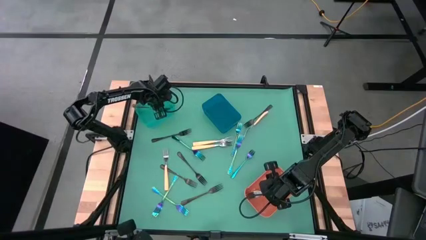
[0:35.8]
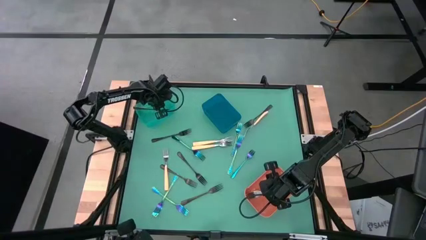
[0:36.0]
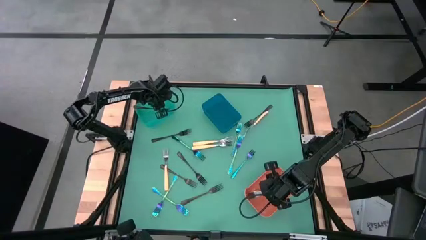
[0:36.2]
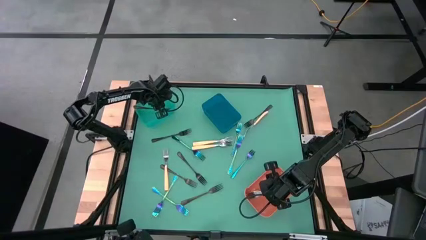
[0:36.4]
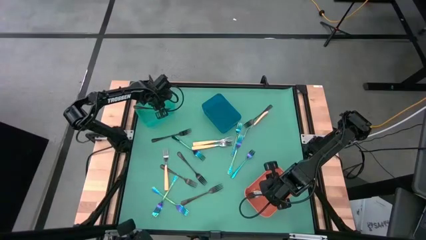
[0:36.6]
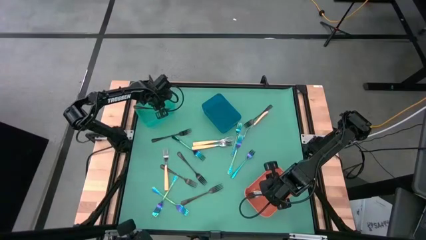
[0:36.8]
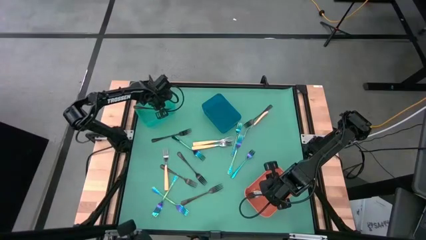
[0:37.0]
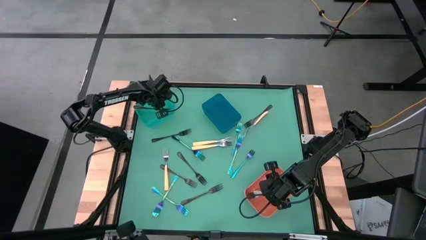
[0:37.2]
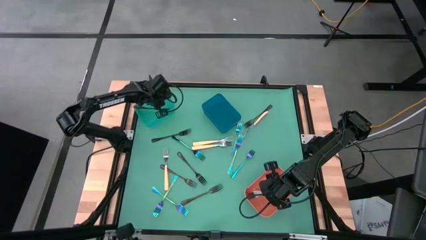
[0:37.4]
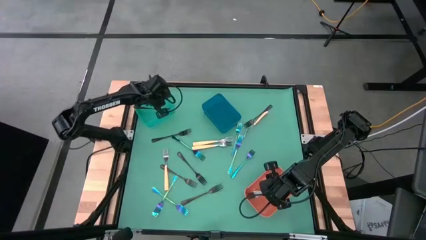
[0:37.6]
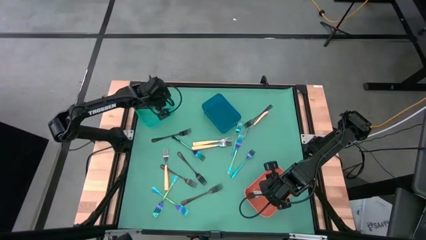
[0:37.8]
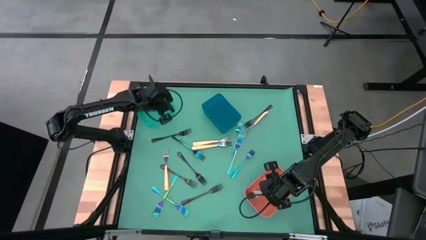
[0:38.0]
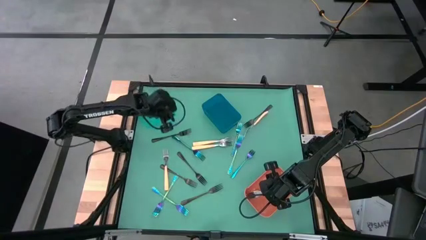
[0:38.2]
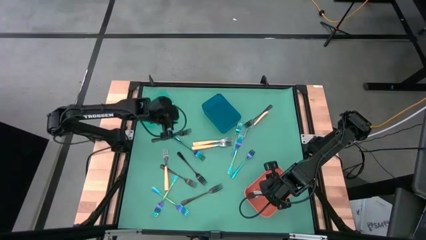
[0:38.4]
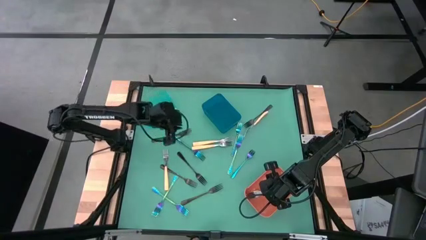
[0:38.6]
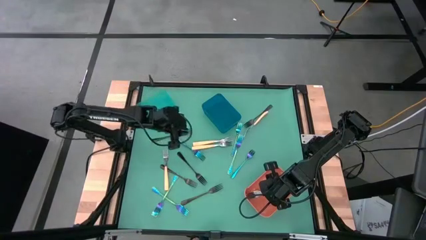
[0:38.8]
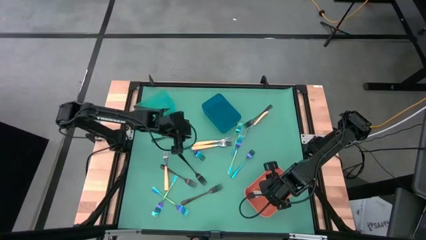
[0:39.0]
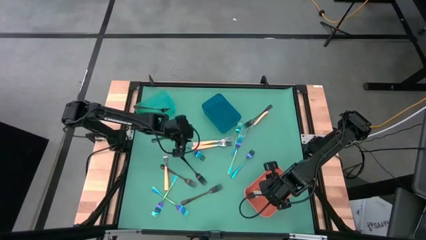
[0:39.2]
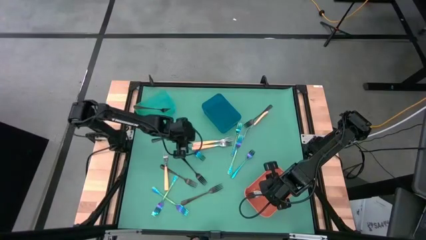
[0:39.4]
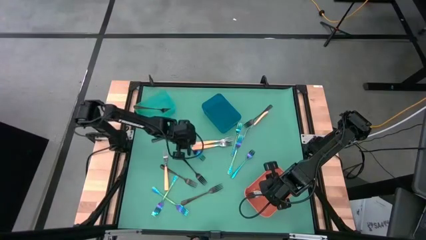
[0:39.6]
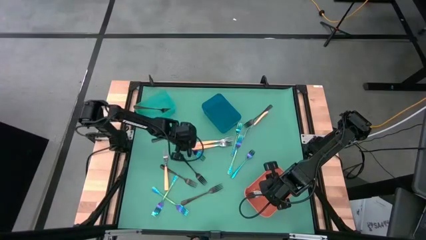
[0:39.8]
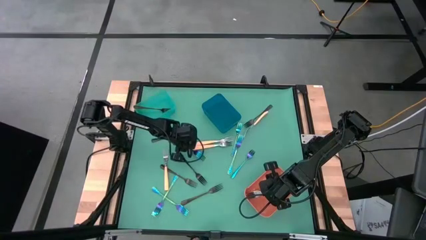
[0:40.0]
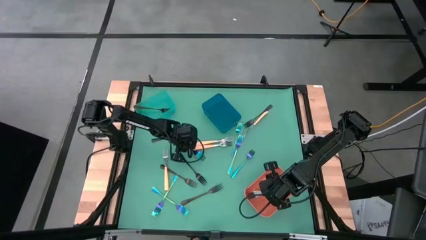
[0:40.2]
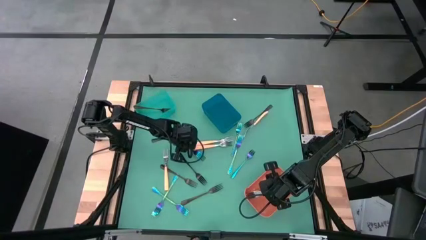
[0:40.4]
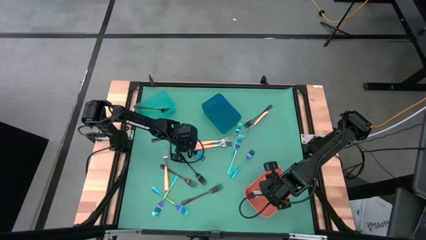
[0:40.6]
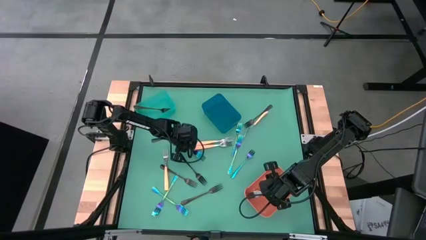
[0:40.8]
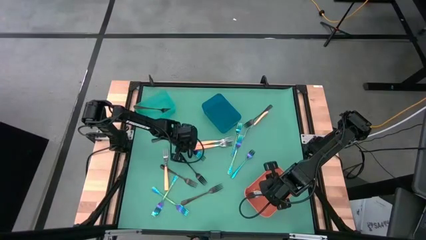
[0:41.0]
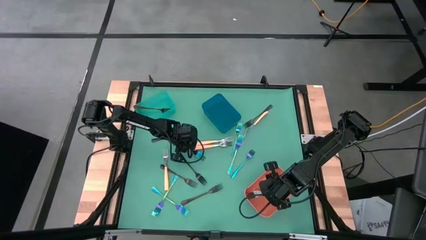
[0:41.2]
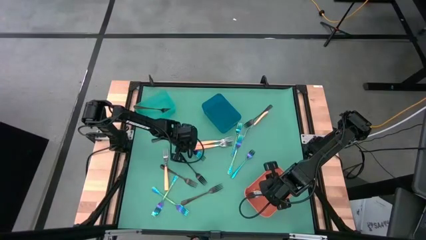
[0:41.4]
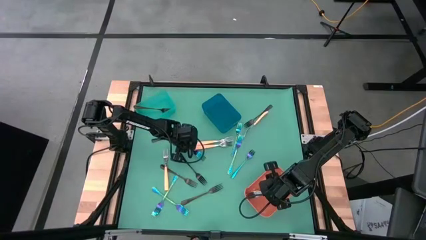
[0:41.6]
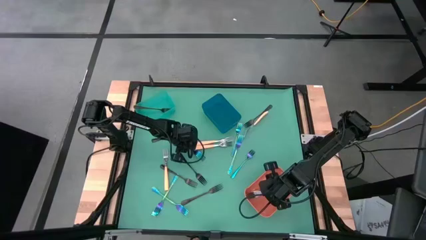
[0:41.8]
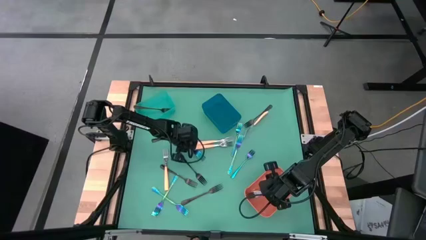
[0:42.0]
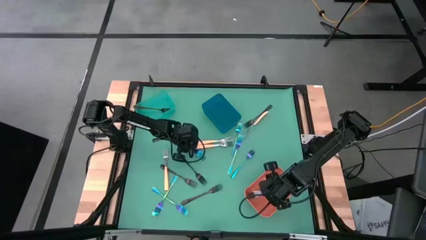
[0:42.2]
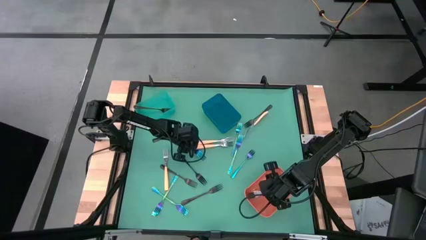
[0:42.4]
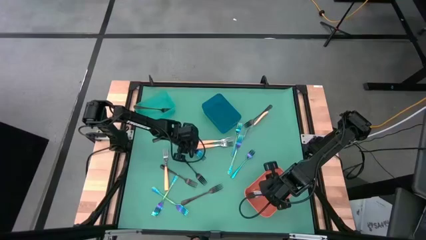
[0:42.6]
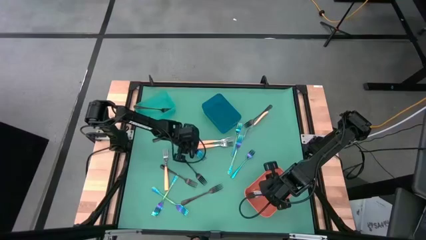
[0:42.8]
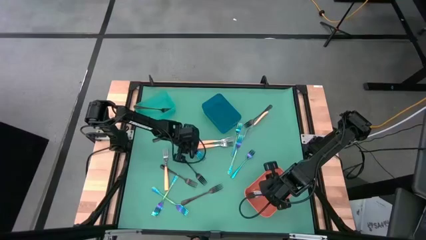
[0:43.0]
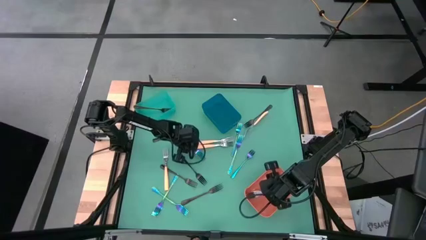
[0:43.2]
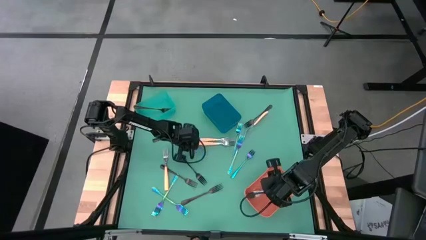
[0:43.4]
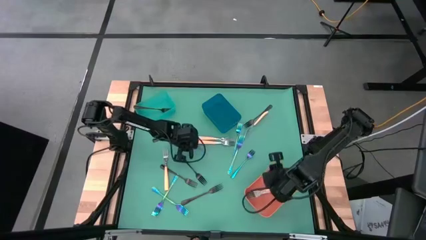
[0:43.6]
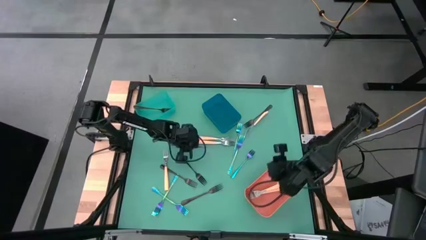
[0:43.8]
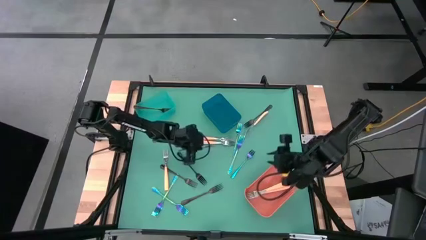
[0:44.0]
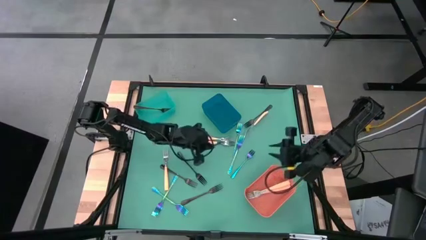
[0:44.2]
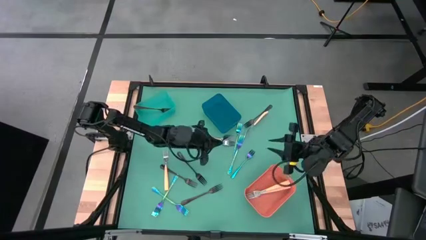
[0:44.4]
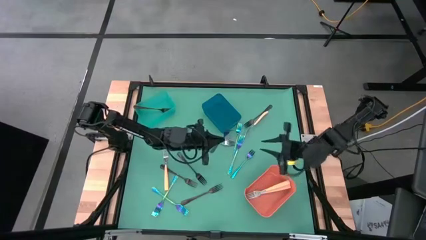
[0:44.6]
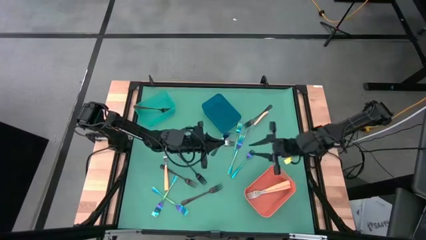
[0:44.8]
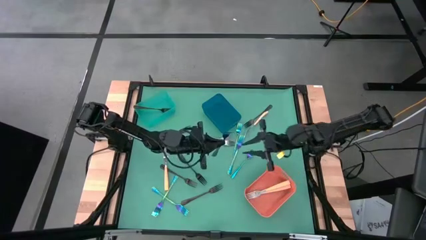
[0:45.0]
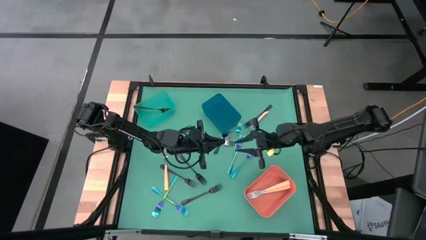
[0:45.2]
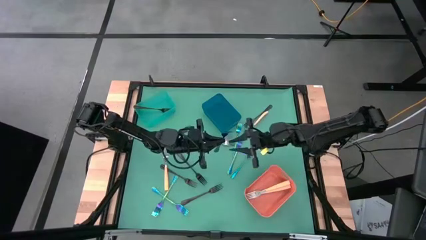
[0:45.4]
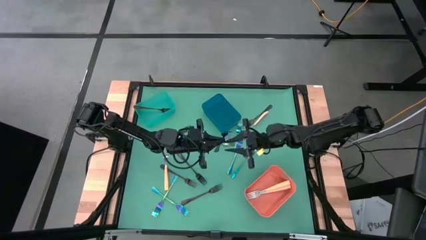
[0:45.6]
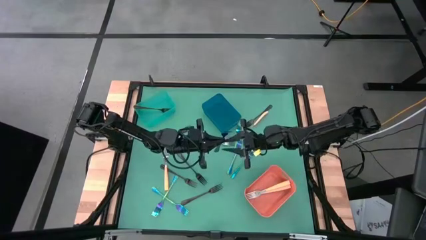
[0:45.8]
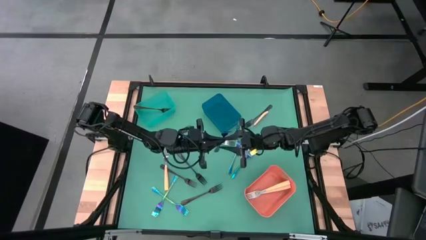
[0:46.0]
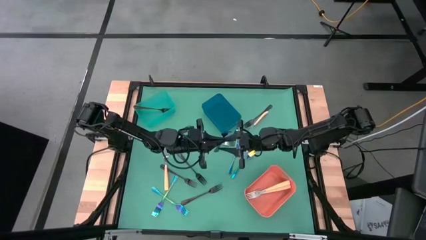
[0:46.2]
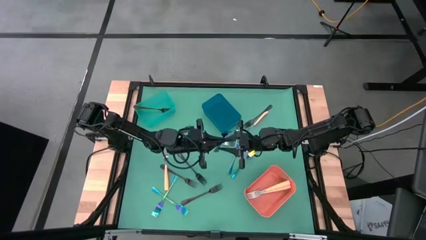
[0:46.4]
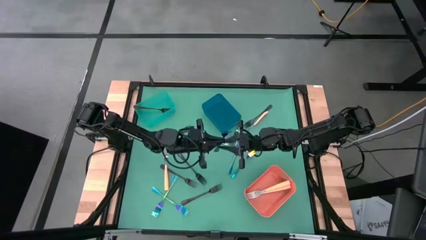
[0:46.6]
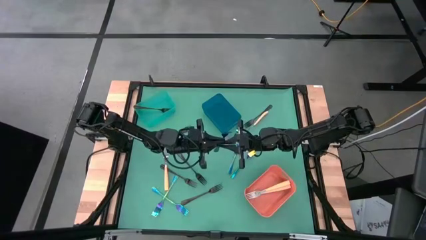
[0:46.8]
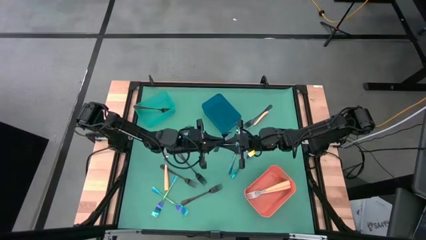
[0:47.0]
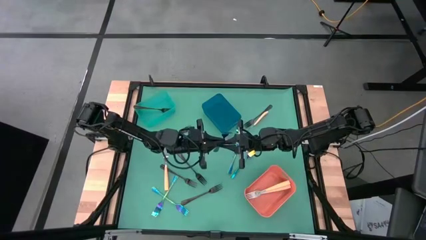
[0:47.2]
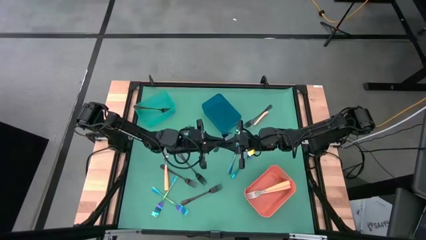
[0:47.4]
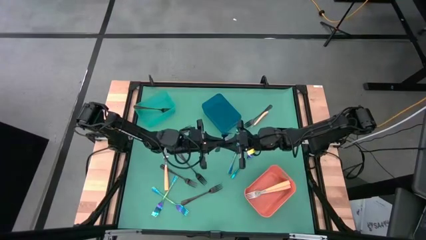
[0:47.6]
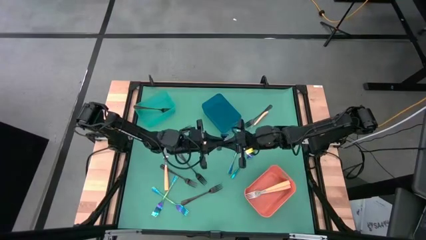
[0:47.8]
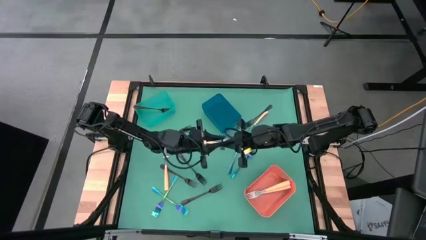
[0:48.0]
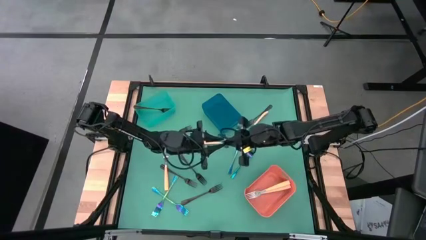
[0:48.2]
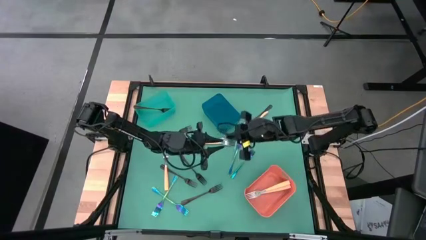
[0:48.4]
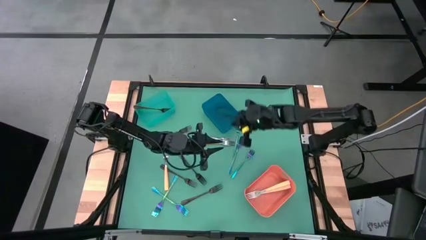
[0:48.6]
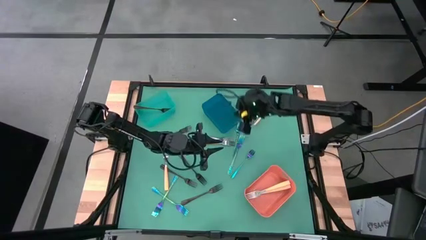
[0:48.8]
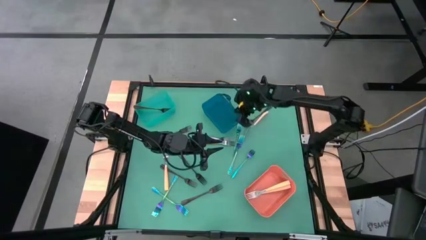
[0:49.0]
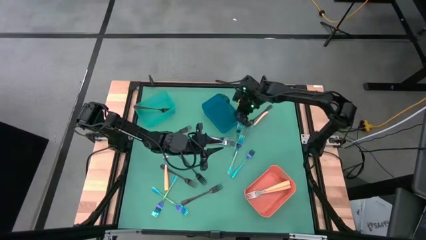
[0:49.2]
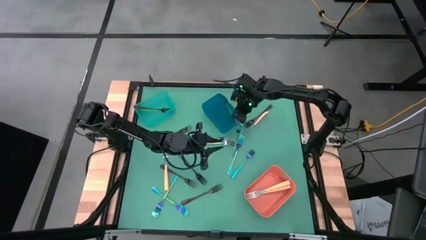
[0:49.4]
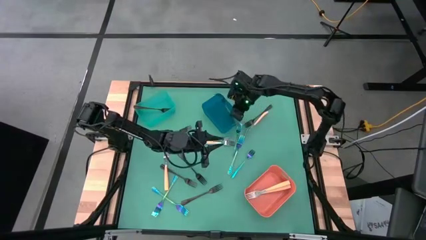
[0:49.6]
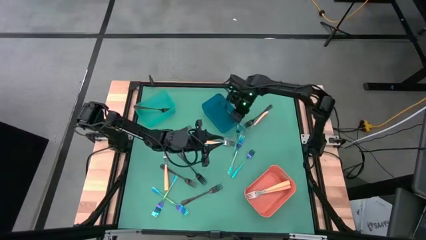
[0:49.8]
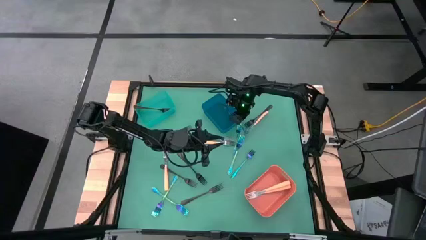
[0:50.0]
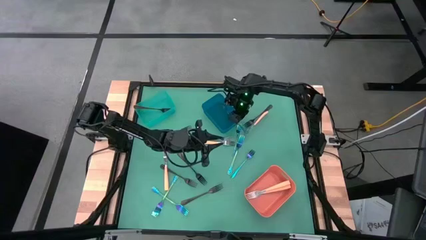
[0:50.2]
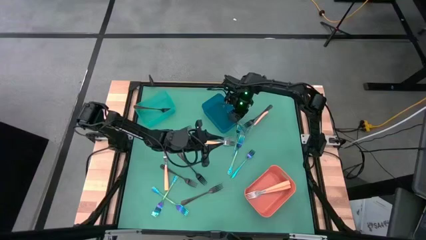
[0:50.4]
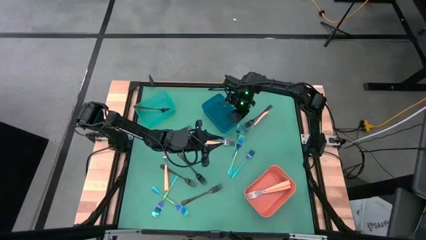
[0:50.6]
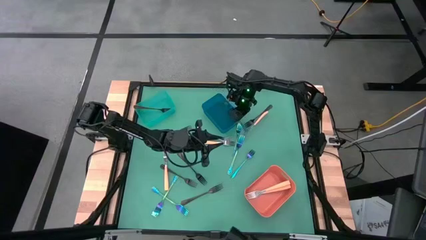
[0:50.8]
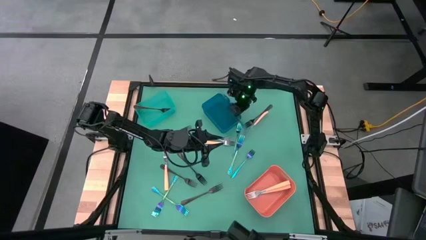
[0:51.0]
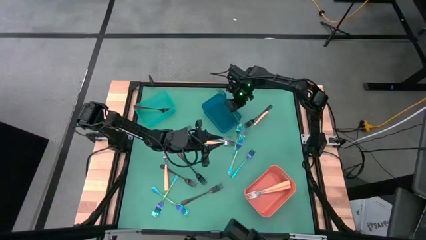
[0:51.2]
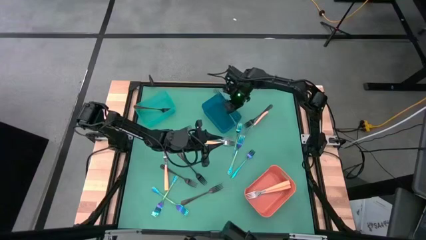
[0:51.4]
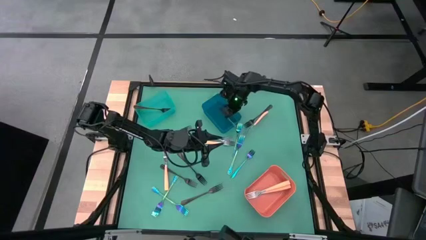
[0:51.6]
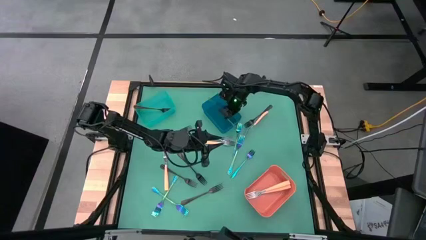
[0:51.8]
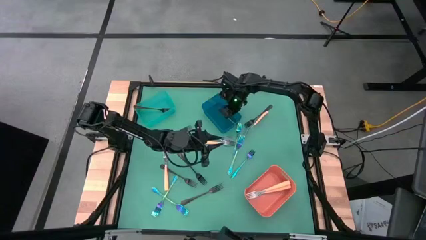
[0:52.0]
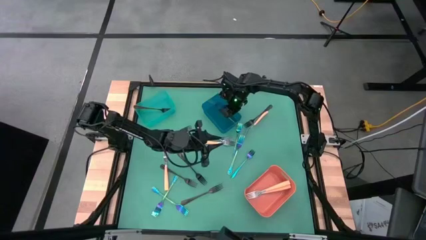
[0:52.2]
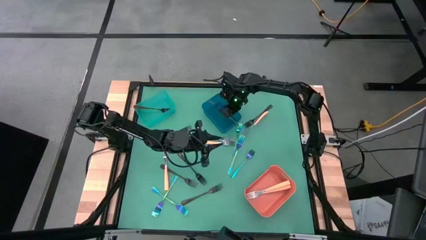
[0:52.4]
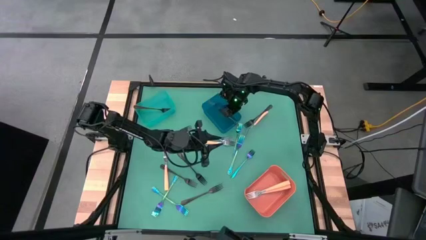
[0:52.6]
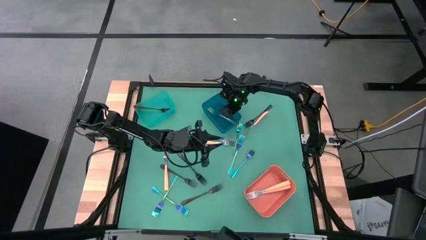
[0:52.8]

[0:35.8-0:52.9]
Task: Sort silverware by color (type)
Put the purple fork into the blue bin
